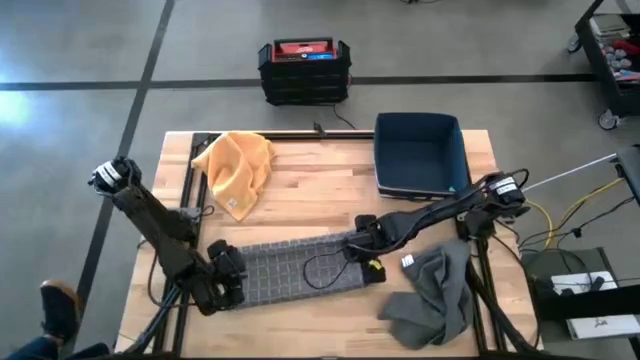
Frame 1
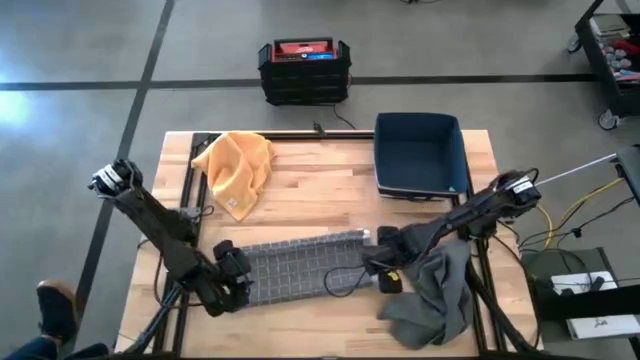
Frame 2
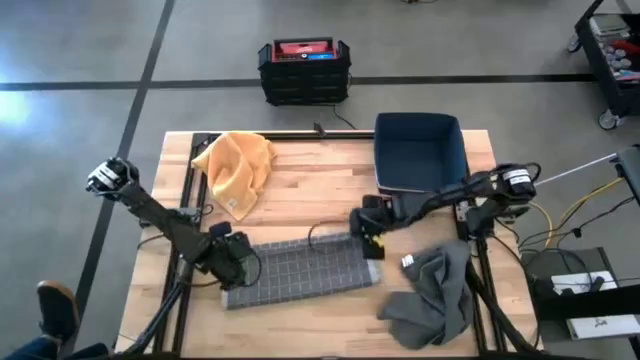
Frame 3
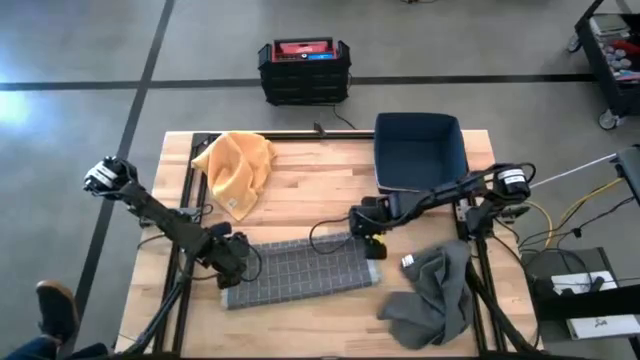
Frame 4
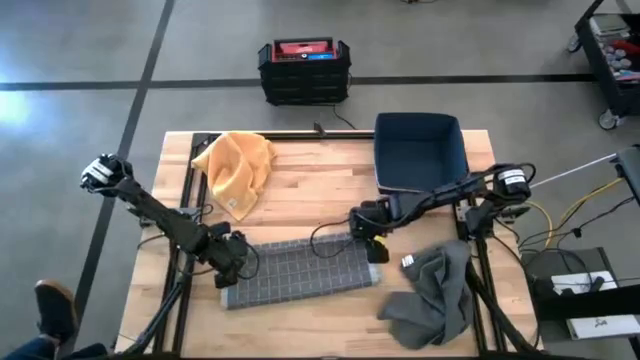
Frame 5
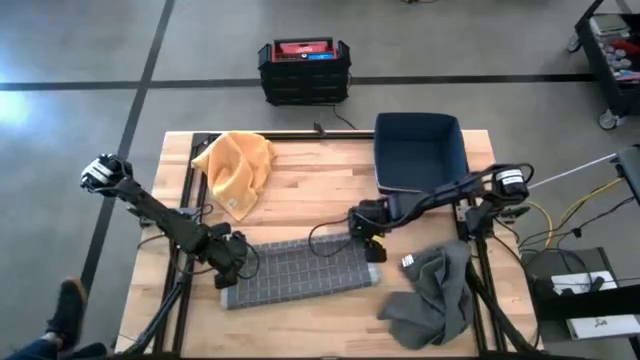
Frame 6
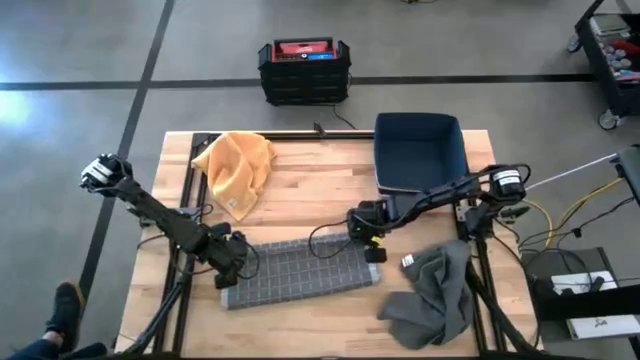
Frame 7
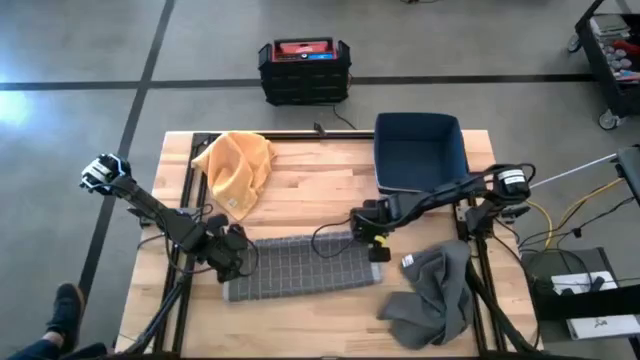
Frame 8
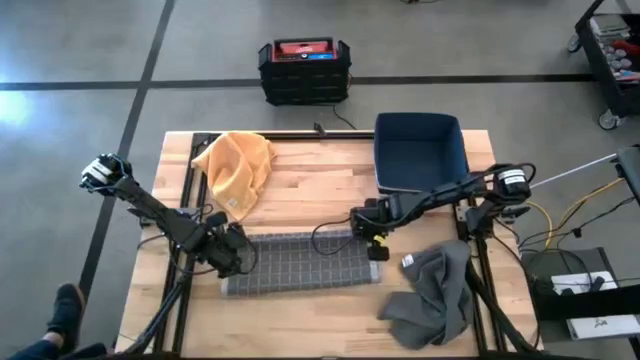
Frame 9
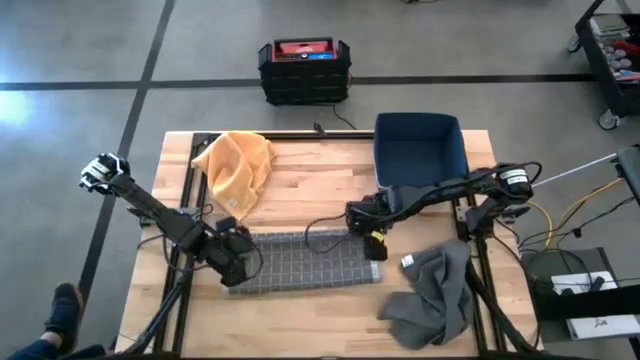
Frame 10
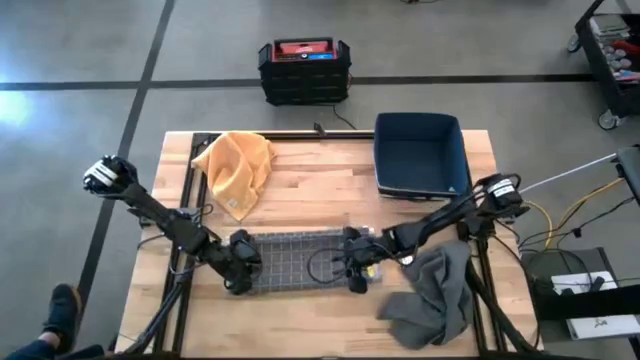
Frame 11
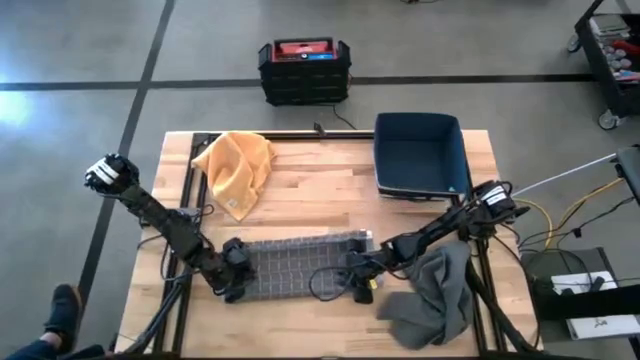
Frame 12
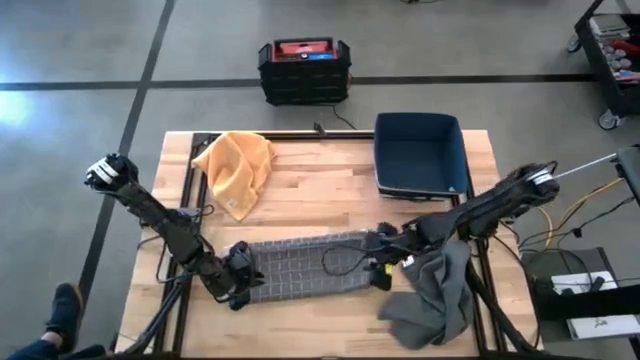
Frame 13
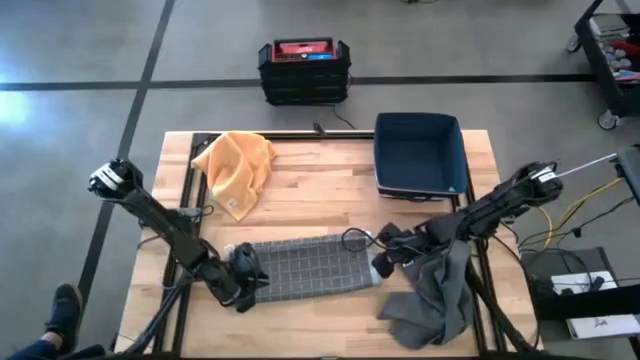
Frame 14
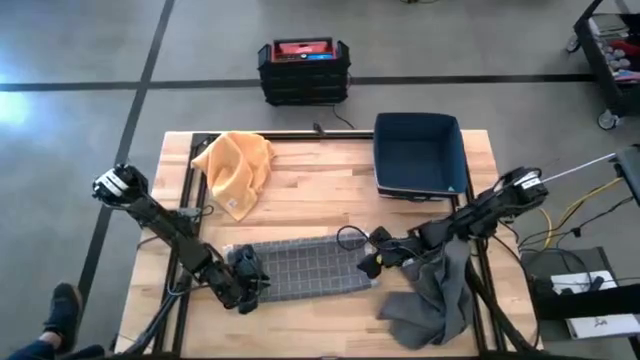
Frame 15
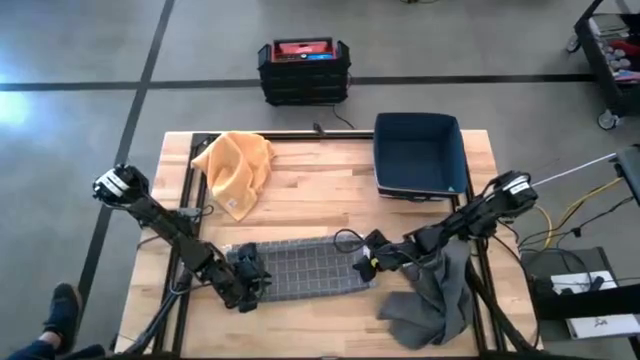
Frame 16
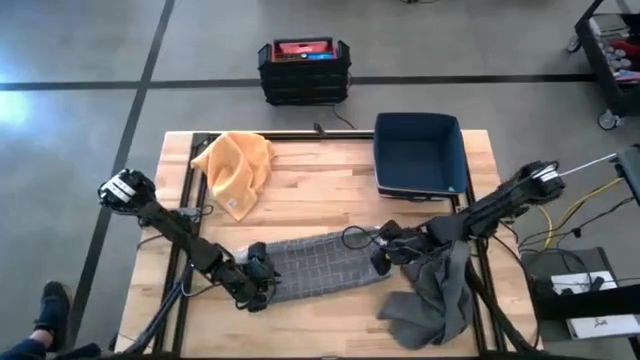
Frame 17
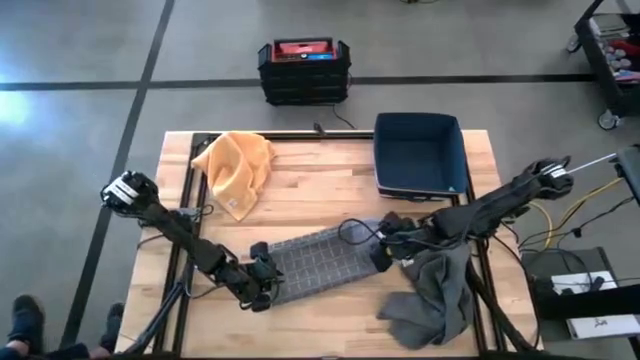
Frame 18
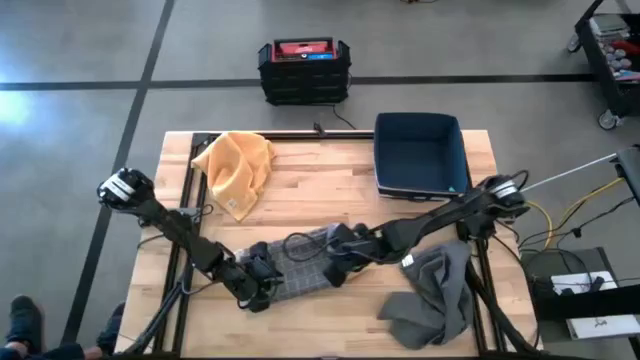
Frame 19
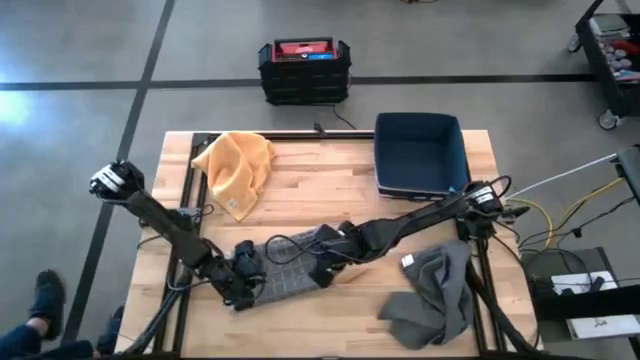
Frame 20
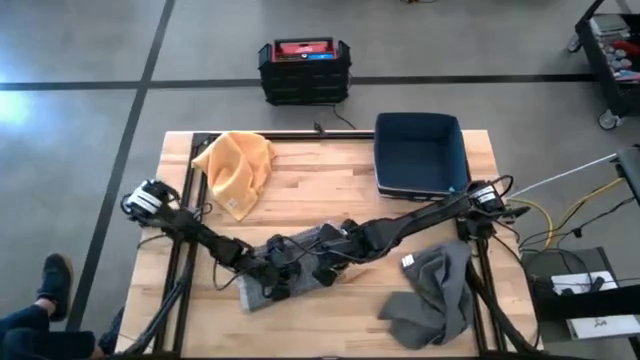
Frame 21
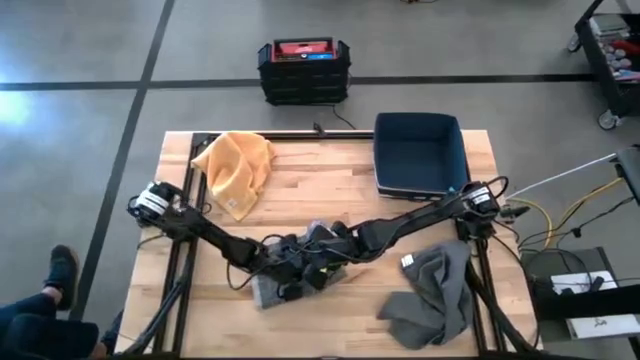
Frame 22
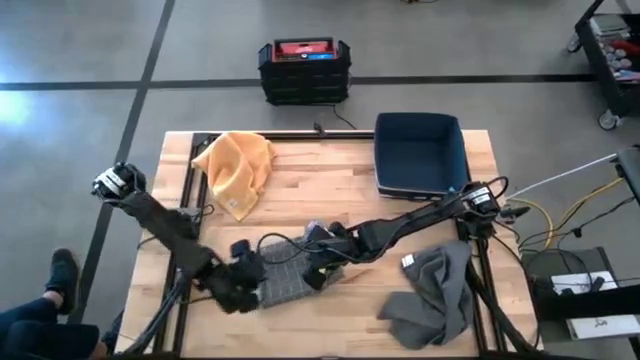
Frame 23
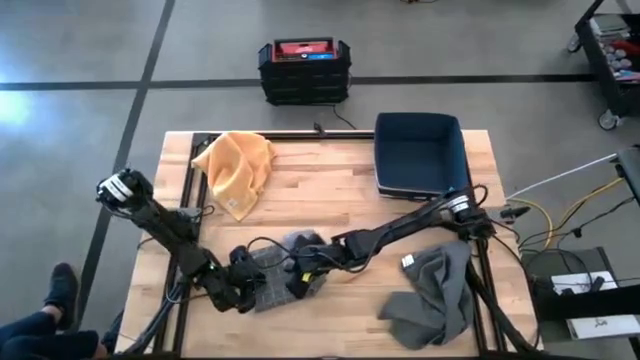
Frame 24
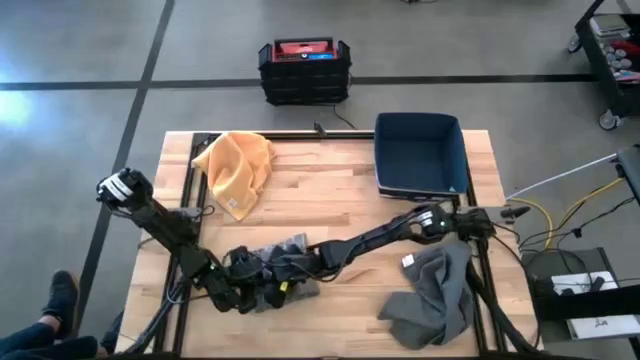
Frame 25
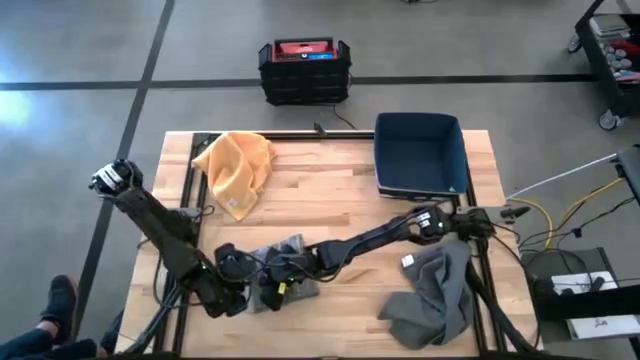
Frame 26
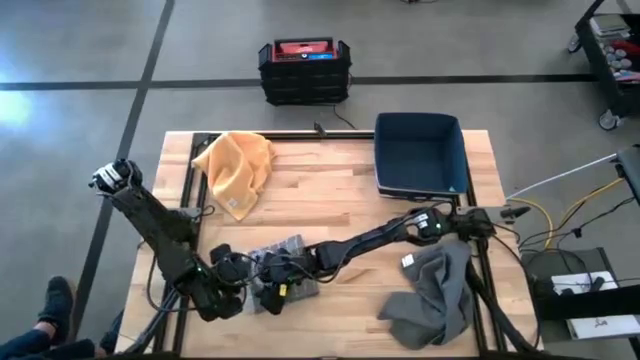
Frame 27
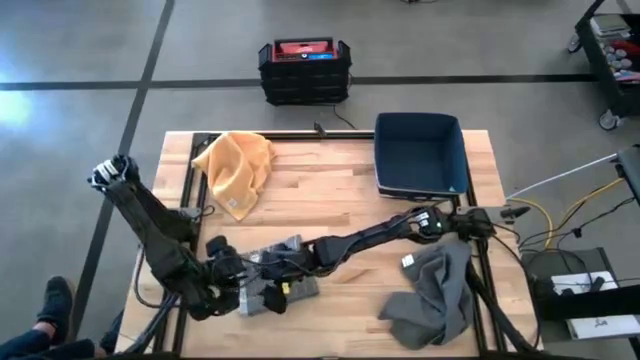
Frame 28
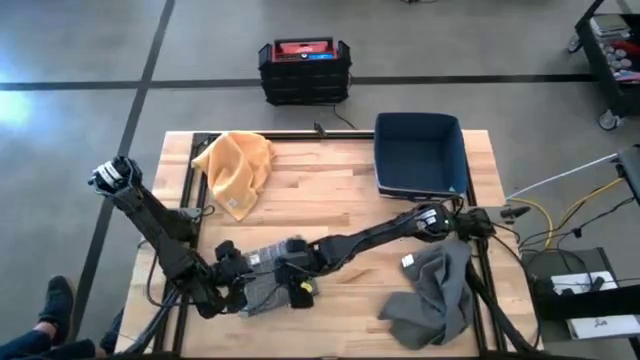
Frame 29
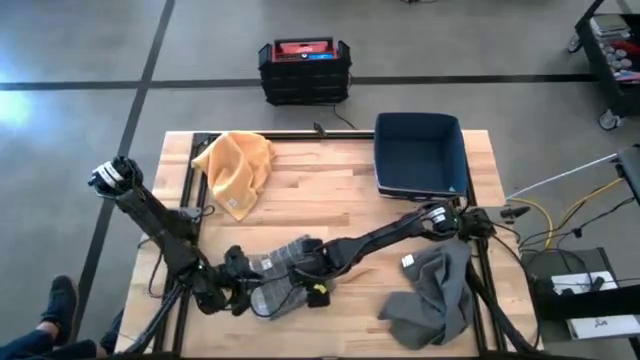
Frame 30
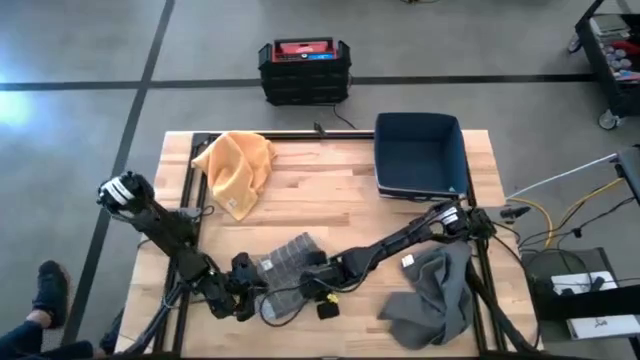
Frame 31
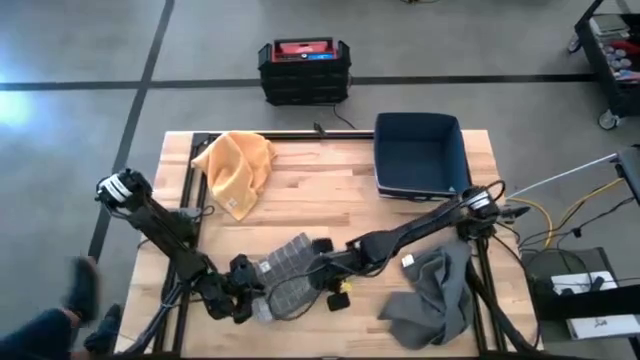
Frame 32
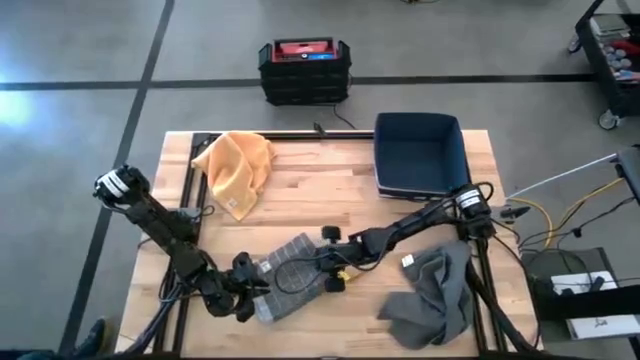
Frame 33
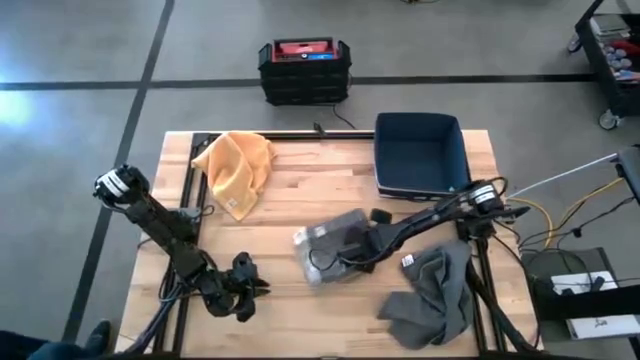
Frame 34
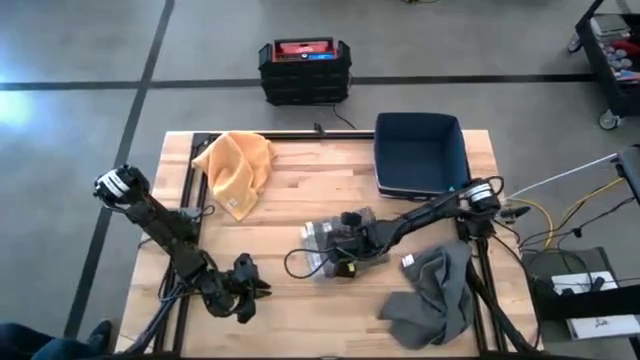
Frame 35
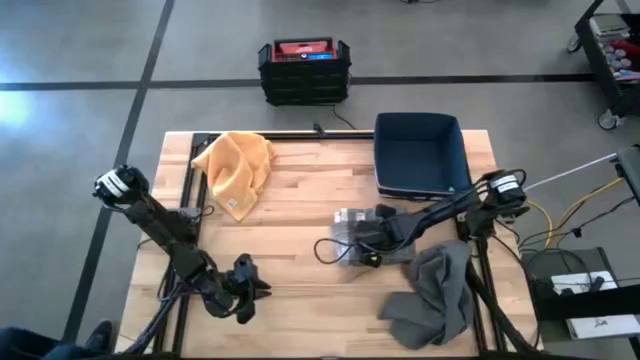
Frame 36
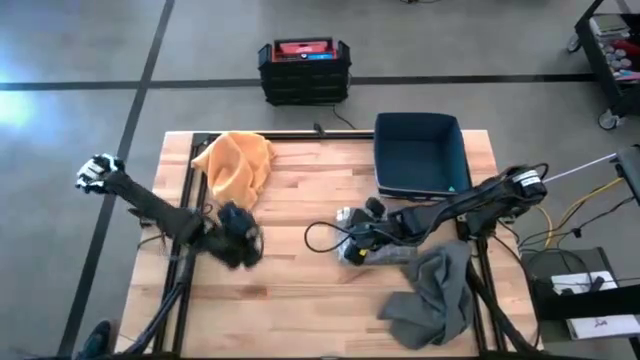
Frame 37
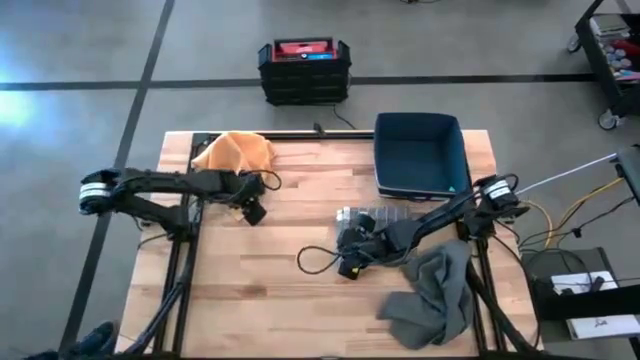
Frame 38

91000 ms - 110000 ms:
Task: Fold towel
Fold the gray patterned kitchen towel

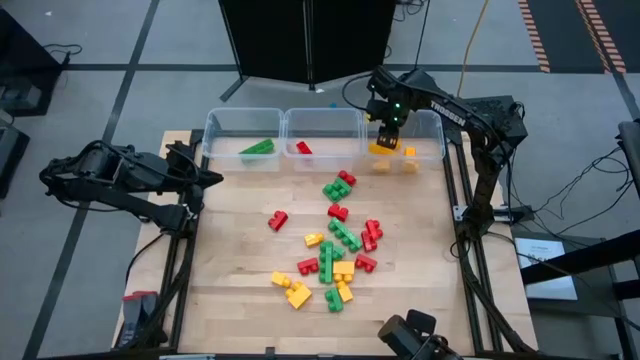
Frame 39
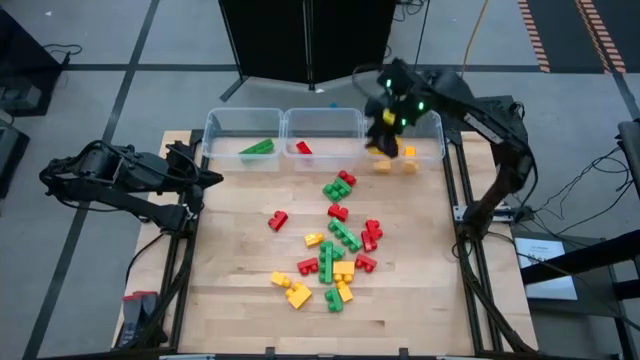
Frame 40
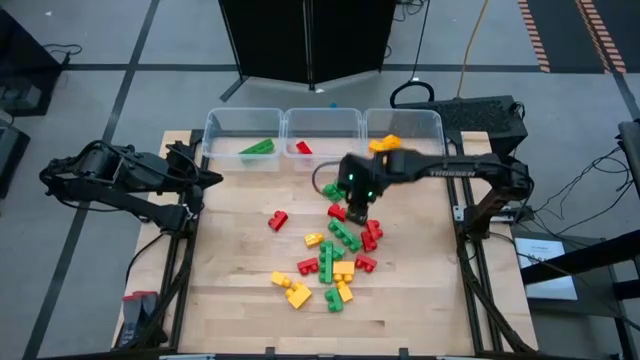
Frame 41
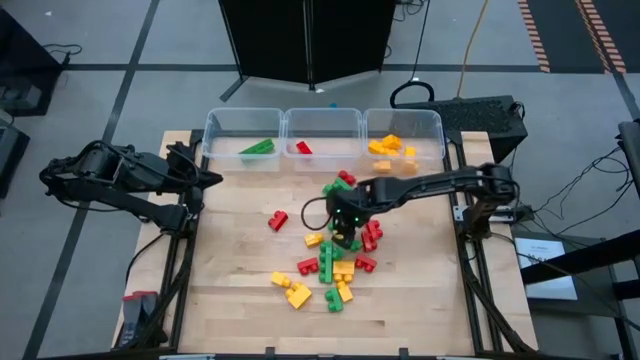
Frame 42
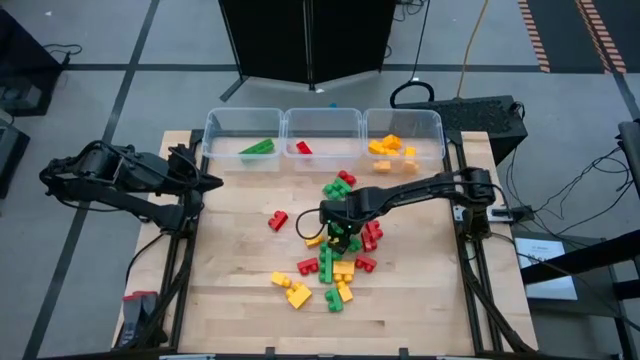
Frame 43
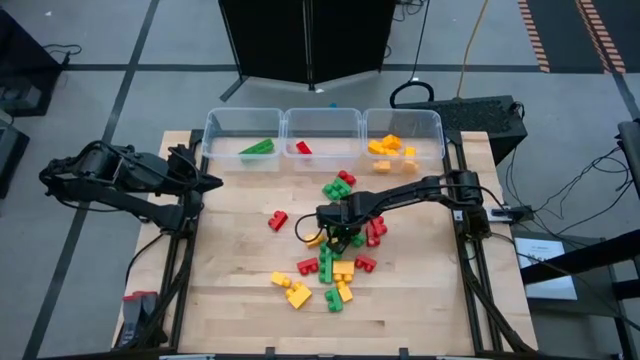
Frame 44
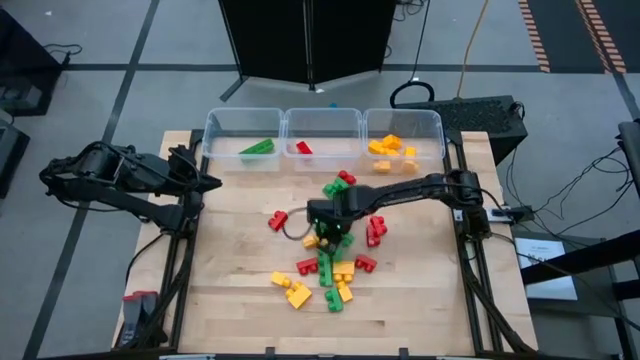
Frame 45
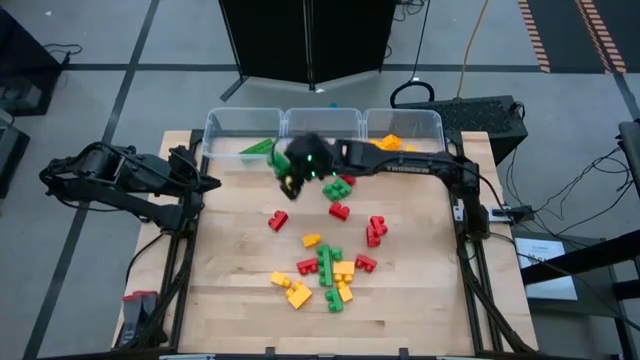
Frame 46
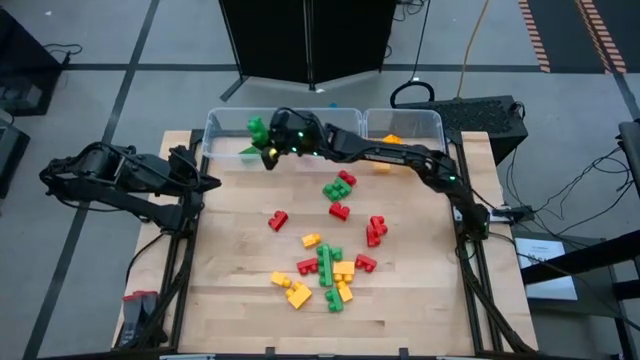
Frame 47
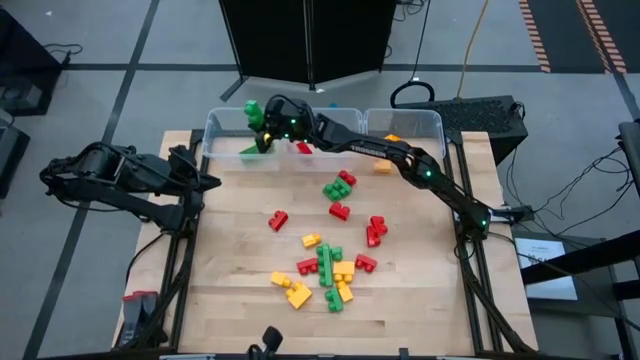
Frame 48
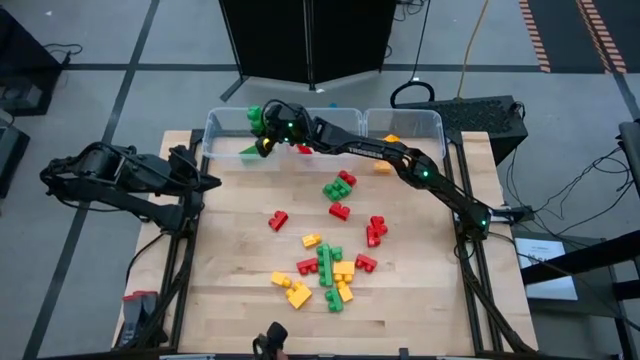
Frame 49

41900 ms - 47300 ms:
Task: Sort blocks
Put the green game piece with 4 studs into the left transparent bin
